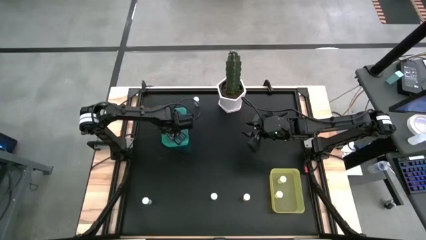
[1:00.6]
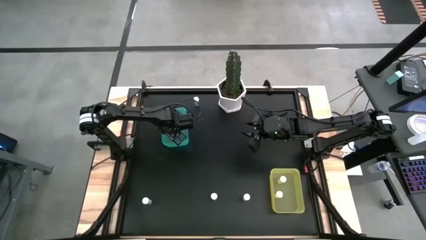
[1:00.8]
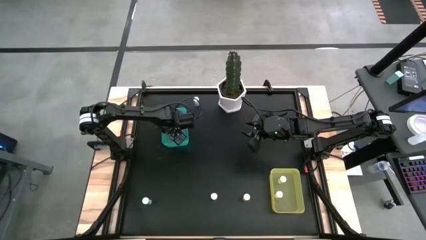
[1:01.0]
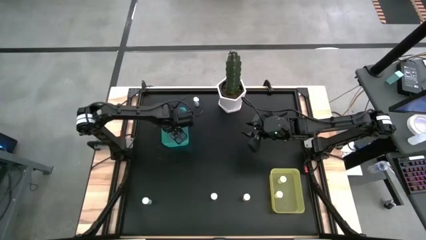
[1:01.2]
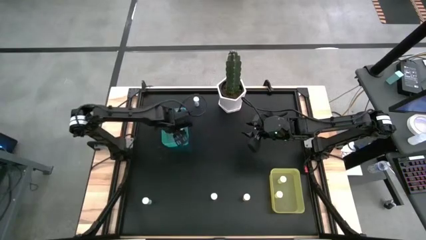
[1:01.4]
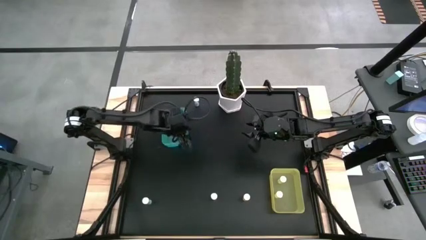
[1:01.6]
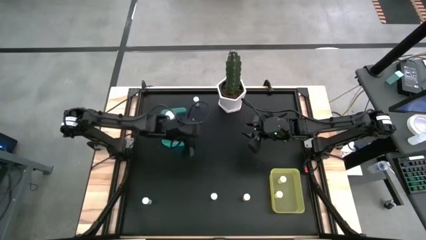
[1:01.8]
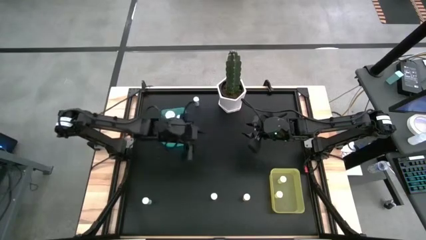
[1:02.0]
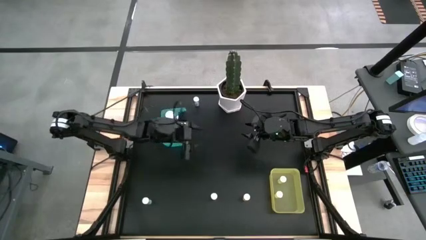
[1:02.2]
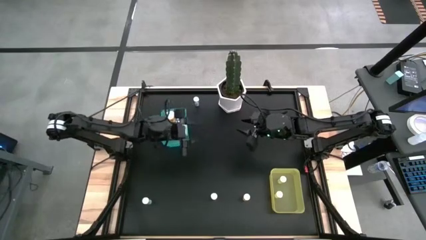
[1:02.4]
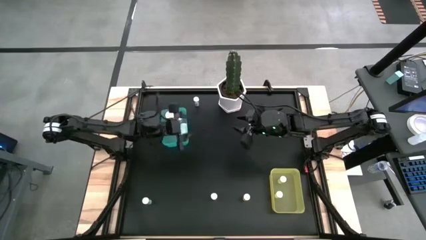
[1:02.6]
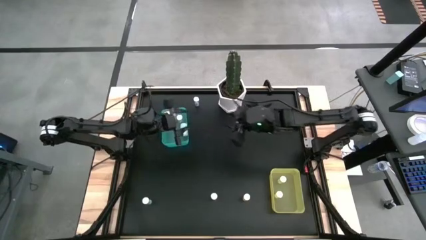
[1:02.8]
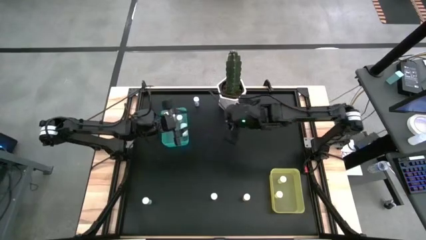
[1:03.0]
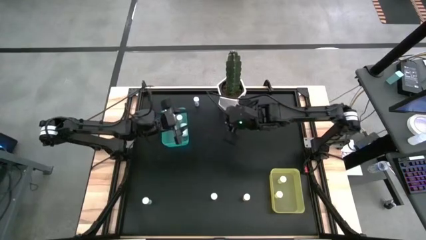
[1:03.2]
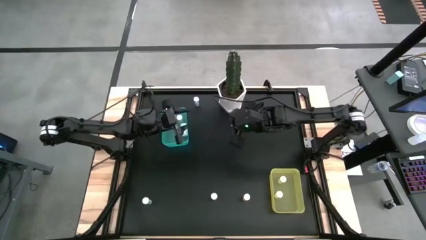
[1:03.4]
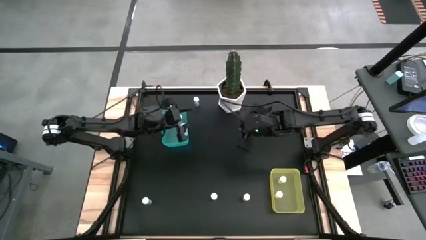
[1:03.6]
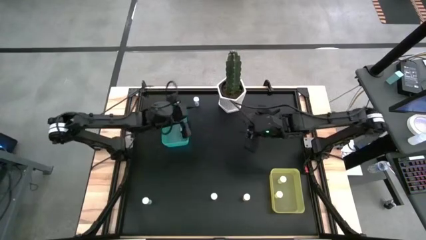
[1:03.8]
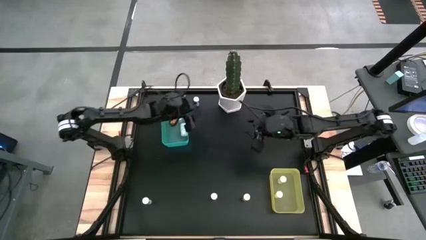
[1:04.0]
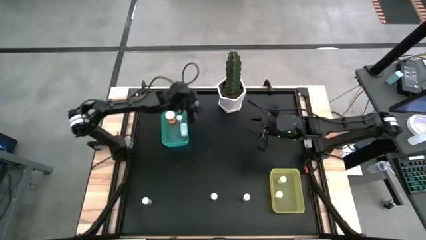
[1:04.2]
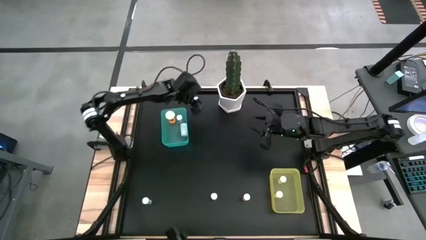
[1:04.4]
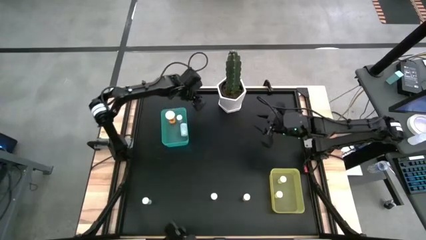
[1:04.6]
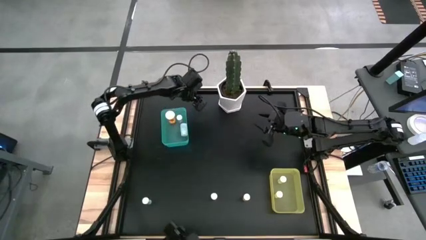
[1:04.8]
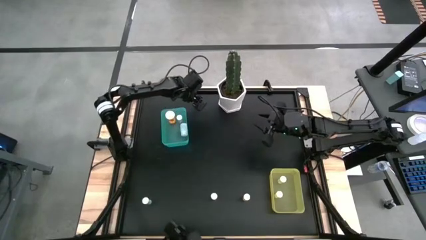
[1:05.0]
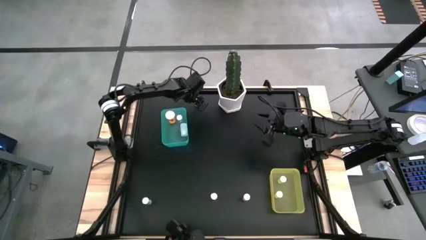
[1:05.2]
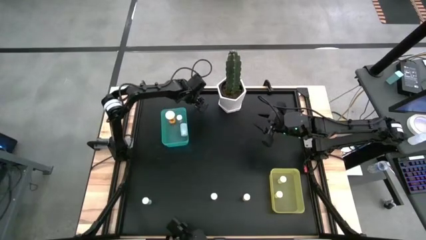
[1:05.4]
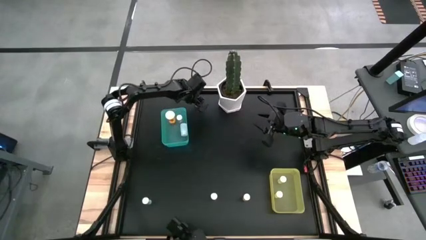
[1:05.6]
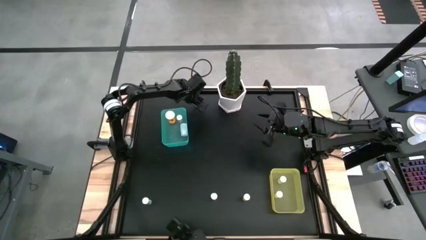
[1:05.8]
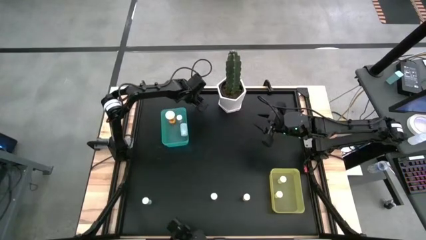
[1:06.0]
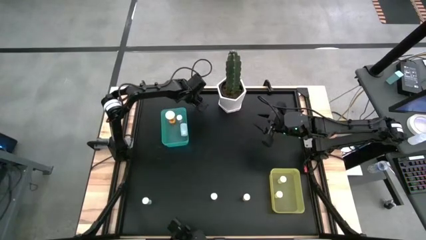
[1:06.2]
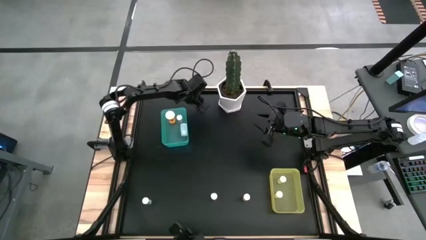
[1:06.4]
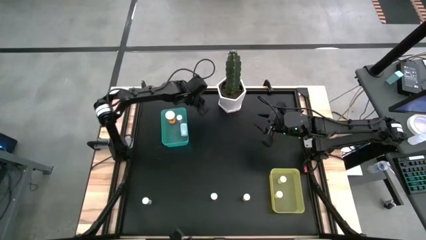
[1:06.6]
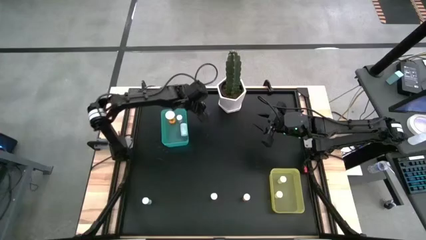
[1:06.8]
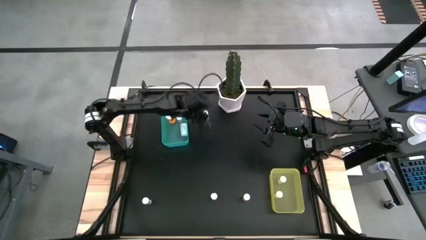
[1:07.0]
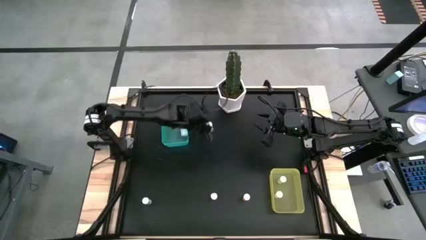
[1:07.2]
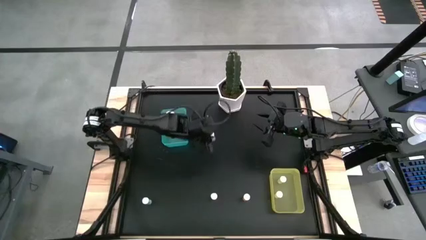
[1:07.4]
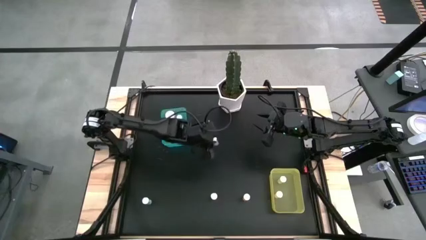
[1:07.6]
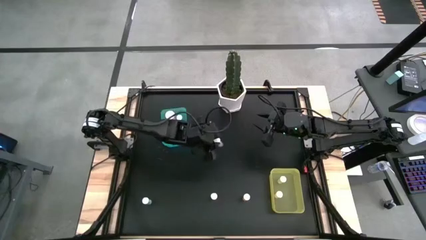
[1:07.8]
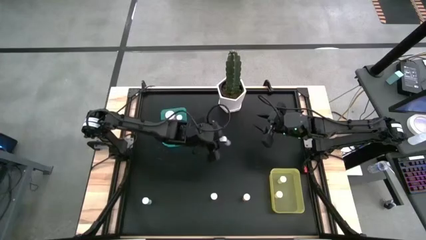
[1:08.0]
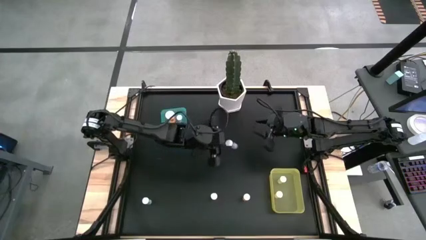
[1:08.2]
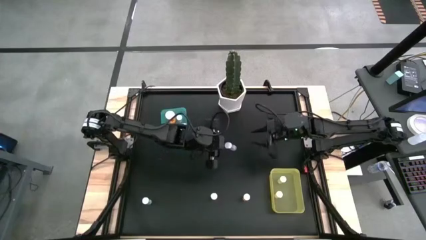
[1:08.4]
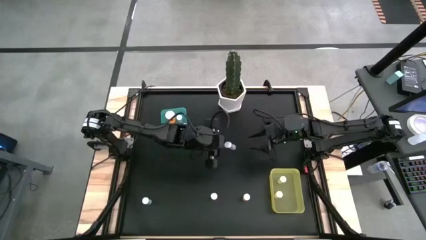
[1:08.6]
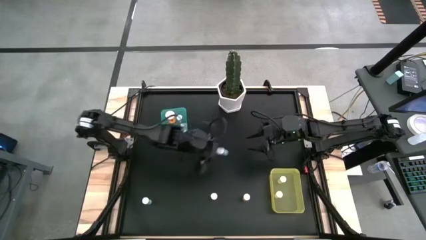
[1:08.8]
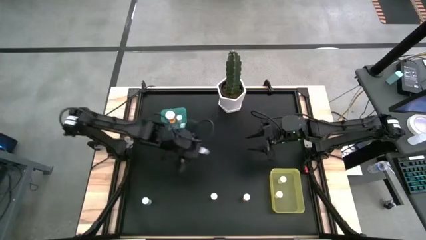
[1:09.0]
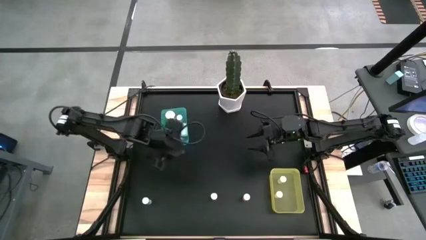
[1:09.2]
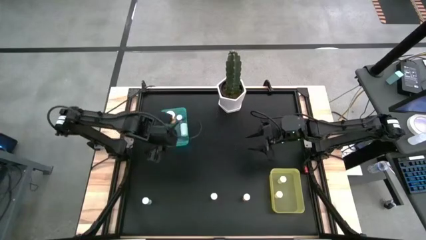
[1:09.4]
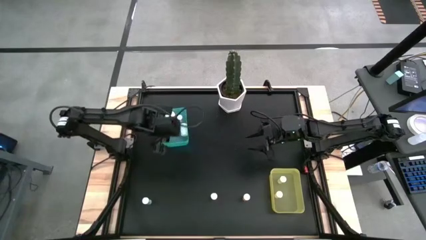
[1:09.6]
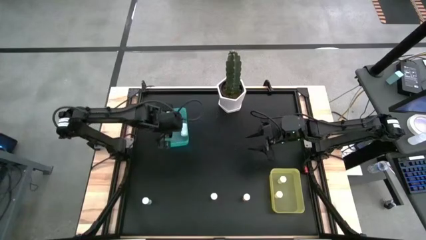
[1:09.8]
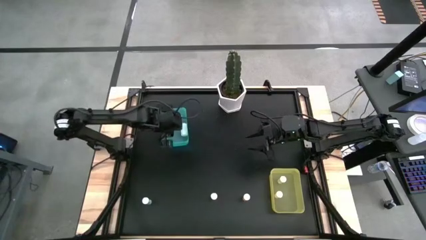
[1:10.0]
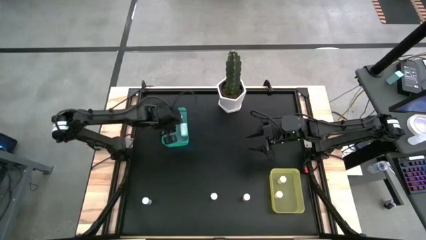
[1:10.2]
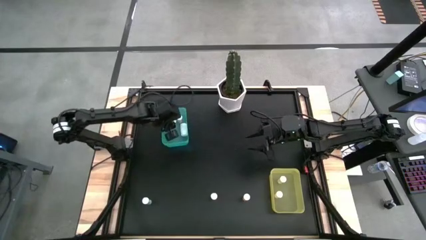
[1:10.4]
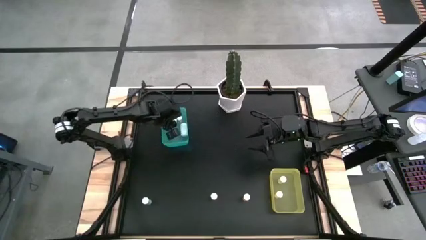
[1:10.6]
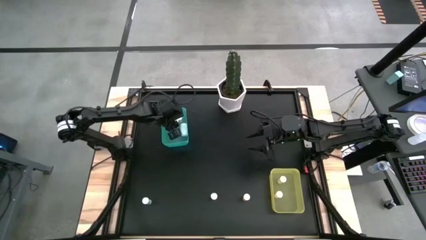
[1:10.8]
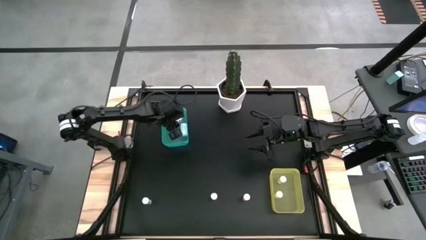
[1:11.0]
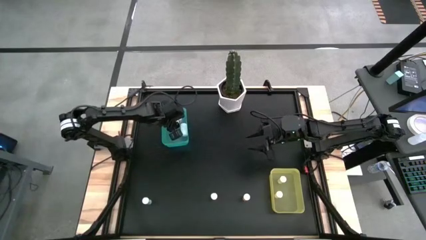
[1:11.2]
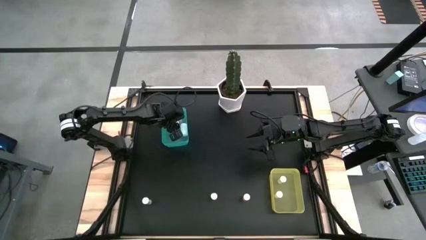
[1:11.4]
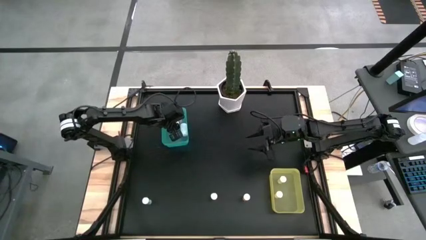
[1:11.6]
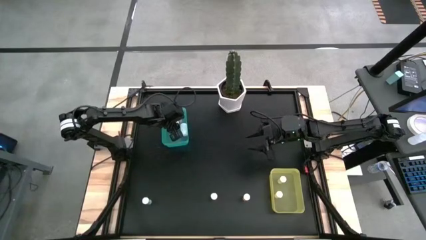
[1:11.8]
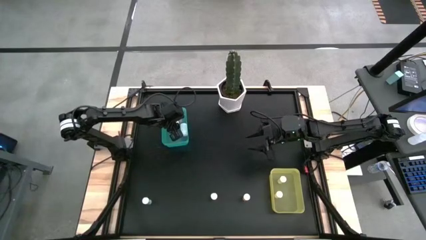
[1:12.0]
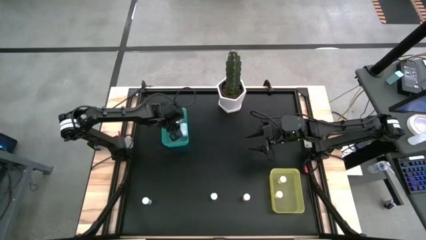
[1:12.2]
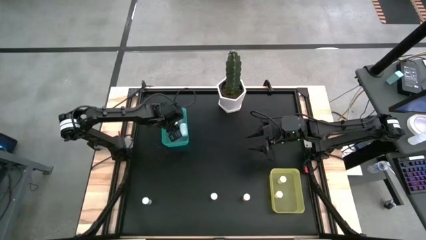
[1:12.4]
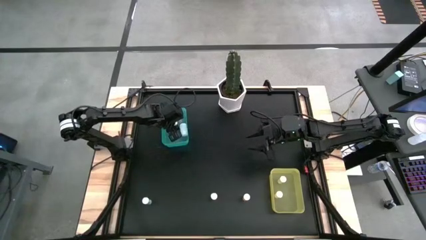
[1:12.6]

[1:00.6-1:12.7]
Task: Pick and place medicine bottles into bin by pill shape (circle, oval)
Put the top blue capsule bottle into the blue bin
